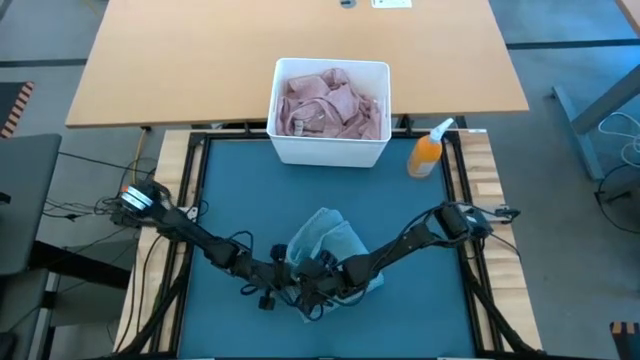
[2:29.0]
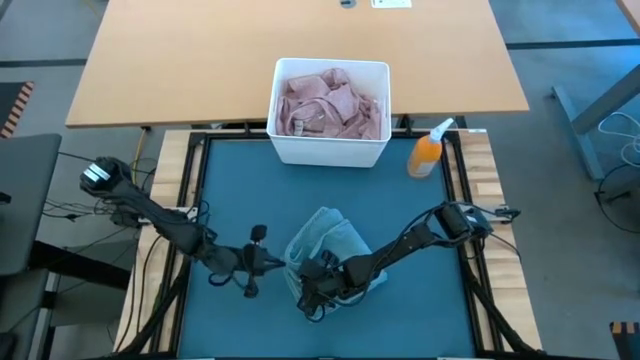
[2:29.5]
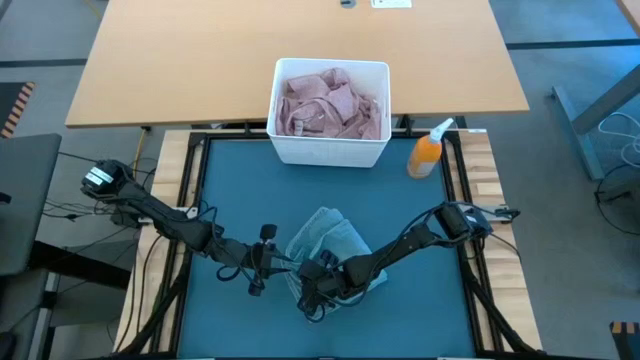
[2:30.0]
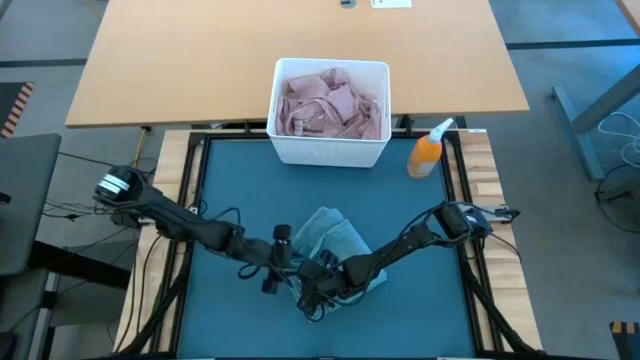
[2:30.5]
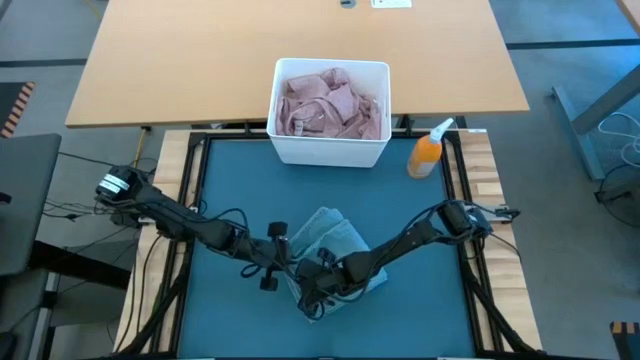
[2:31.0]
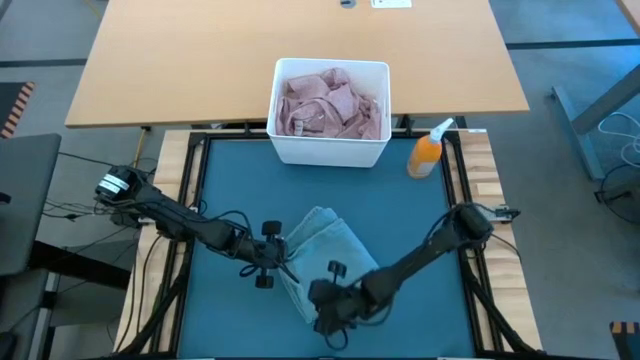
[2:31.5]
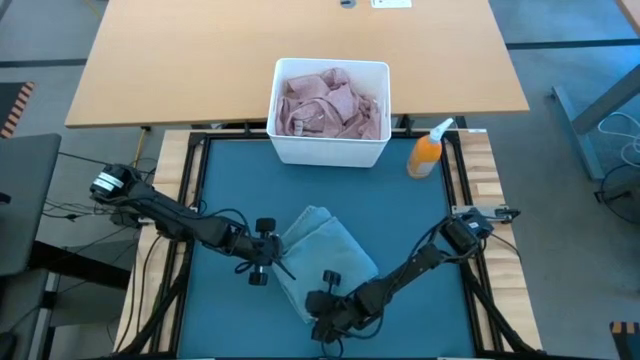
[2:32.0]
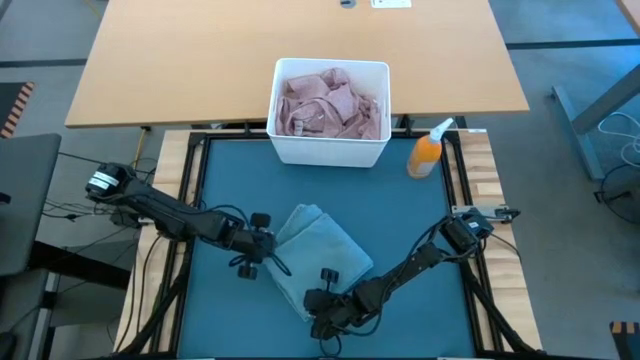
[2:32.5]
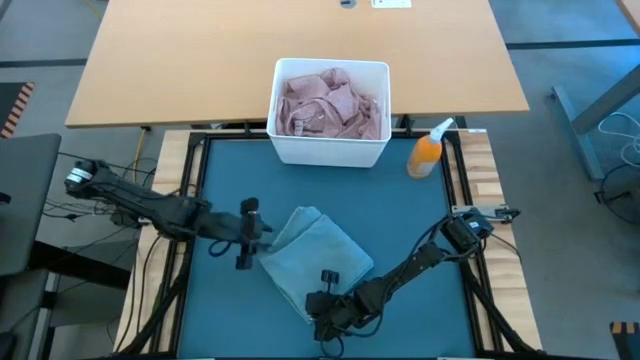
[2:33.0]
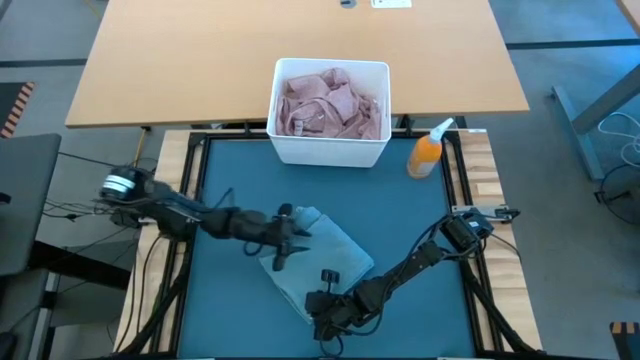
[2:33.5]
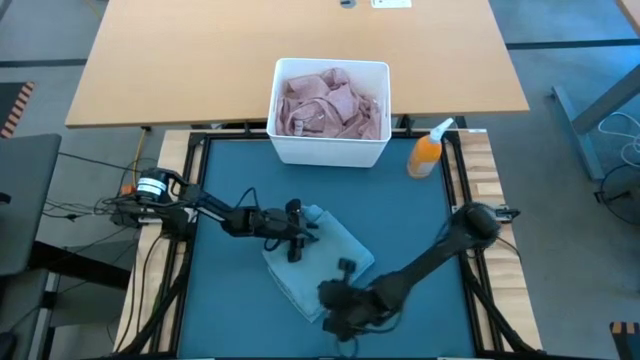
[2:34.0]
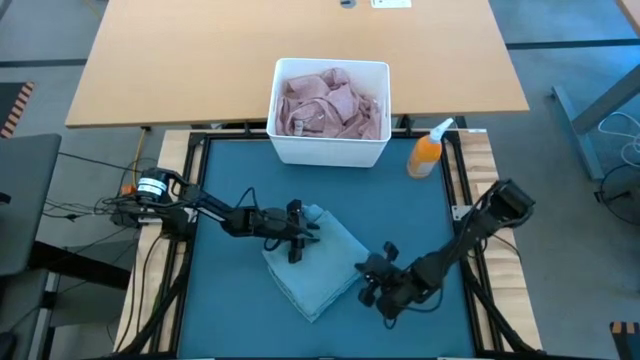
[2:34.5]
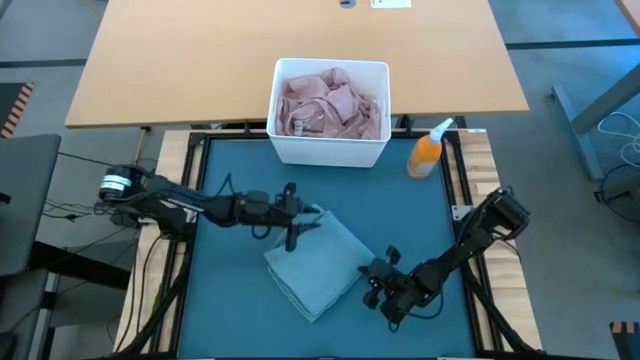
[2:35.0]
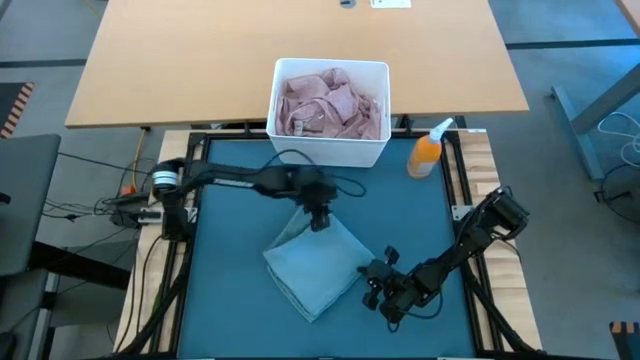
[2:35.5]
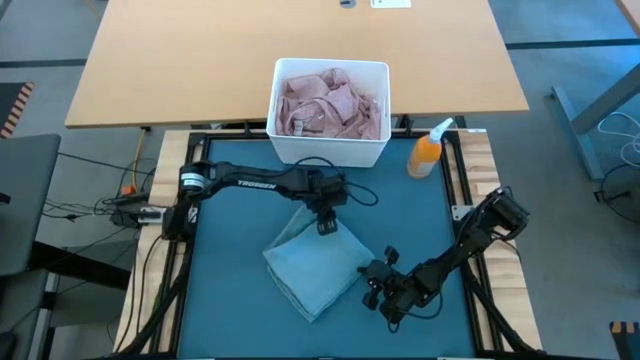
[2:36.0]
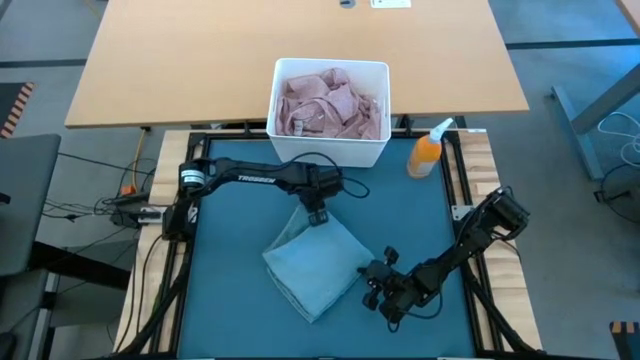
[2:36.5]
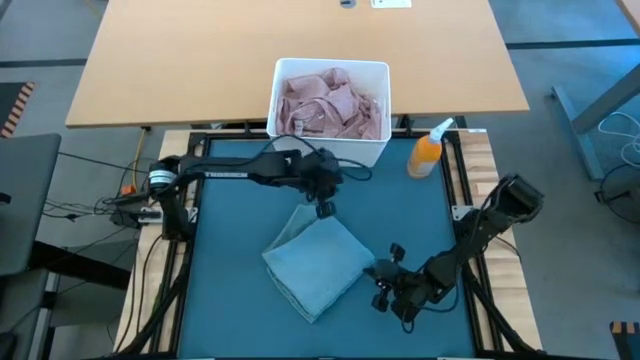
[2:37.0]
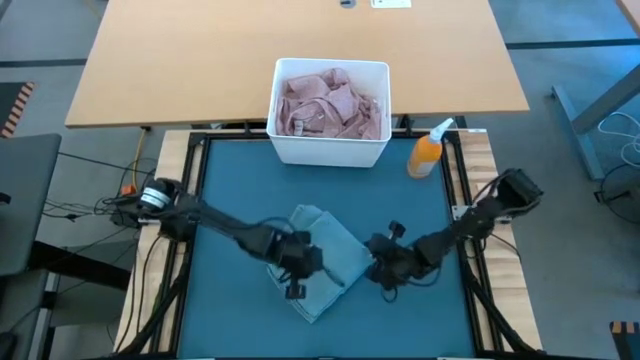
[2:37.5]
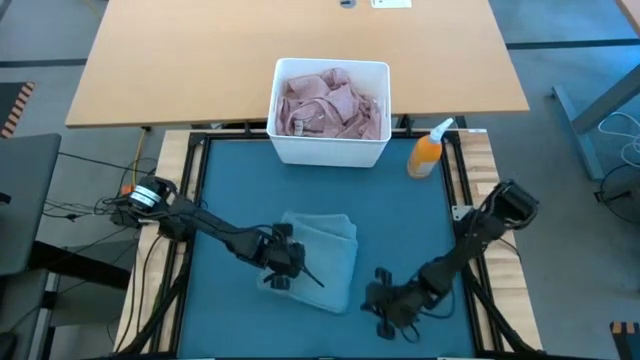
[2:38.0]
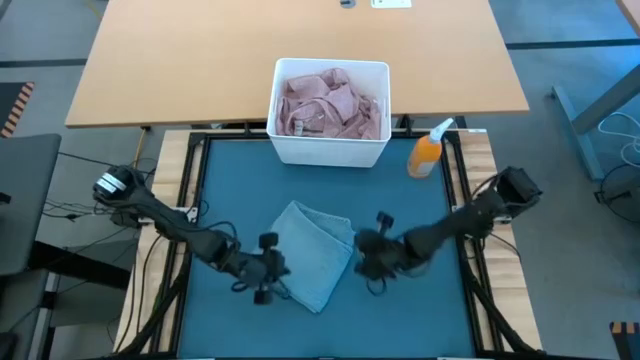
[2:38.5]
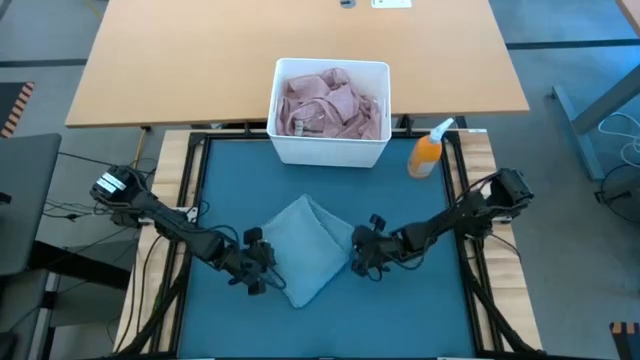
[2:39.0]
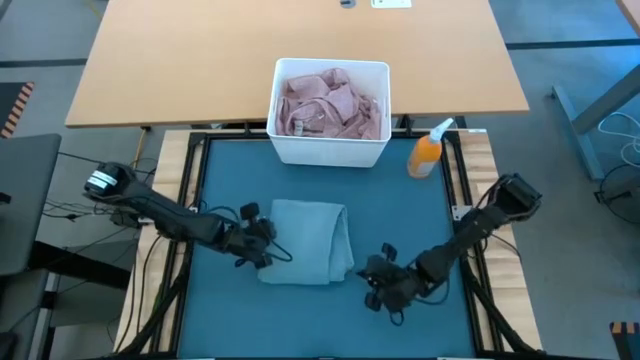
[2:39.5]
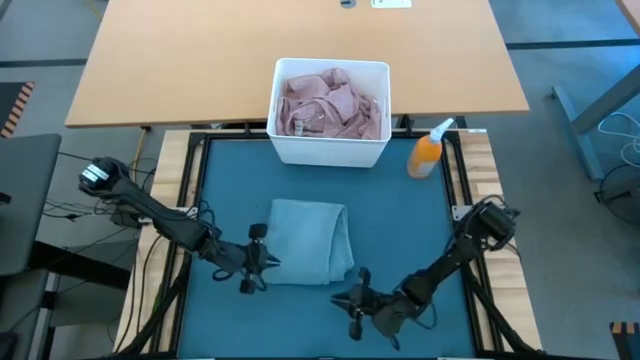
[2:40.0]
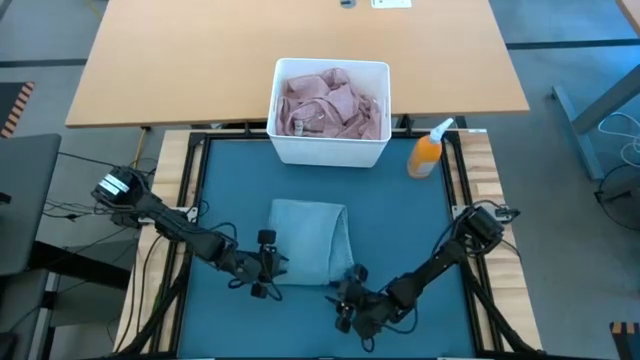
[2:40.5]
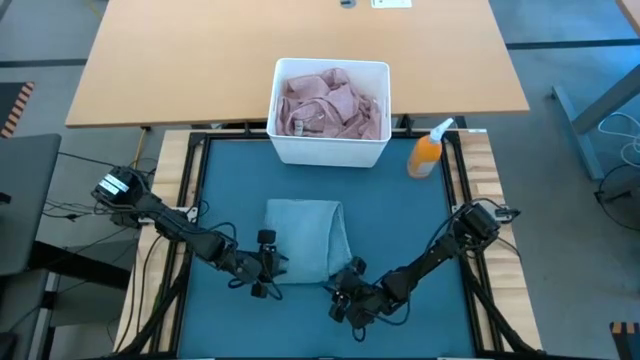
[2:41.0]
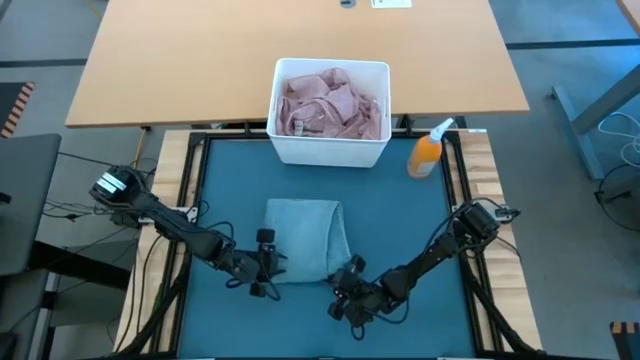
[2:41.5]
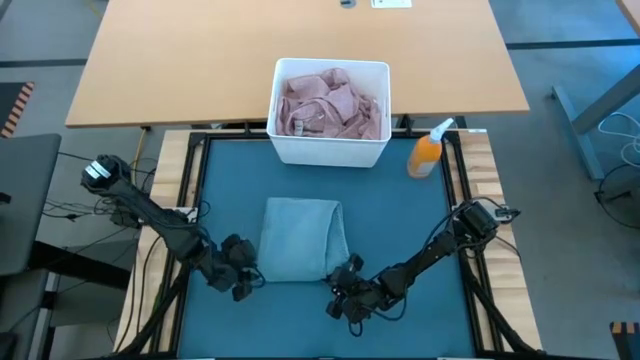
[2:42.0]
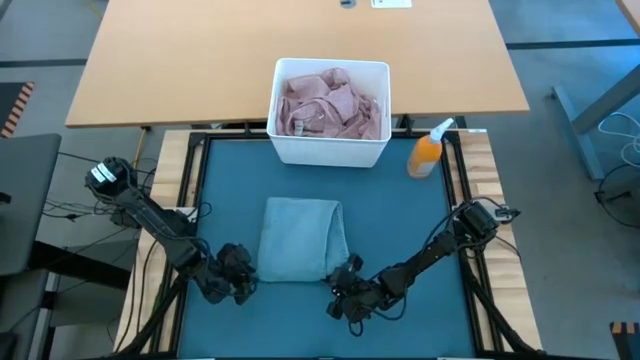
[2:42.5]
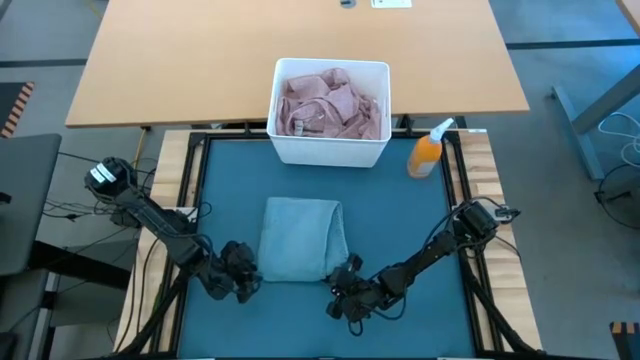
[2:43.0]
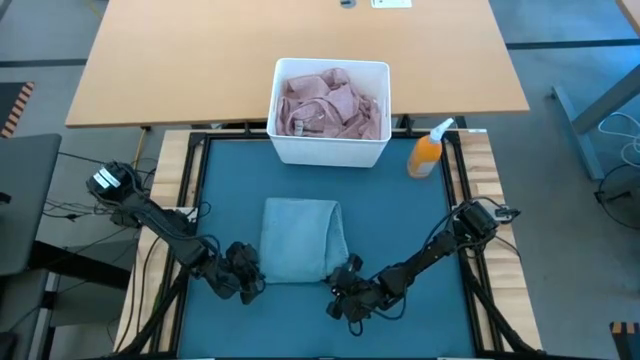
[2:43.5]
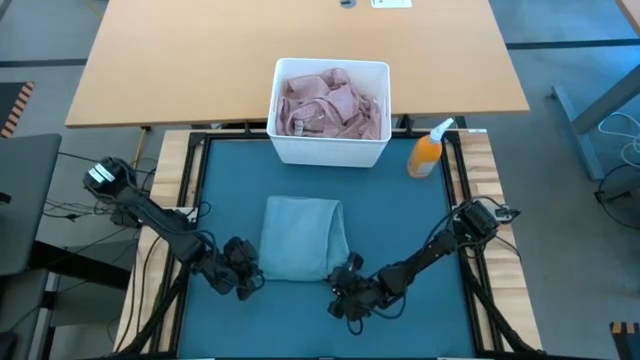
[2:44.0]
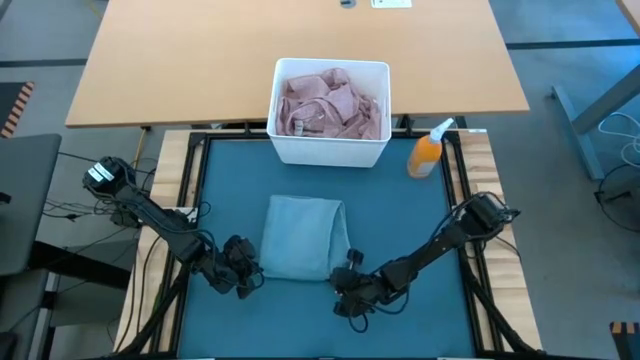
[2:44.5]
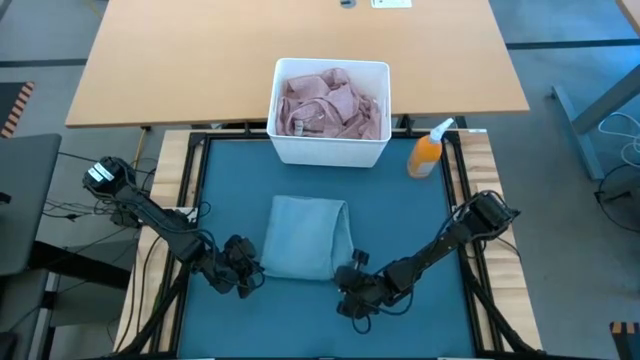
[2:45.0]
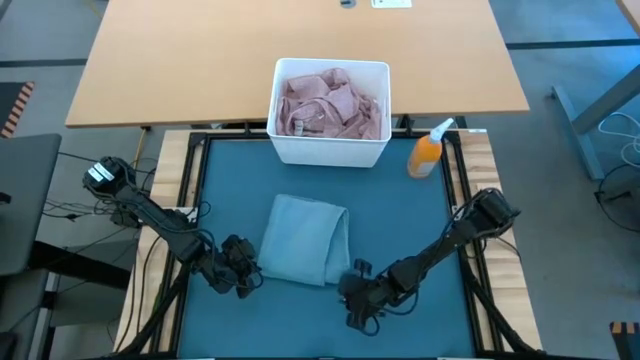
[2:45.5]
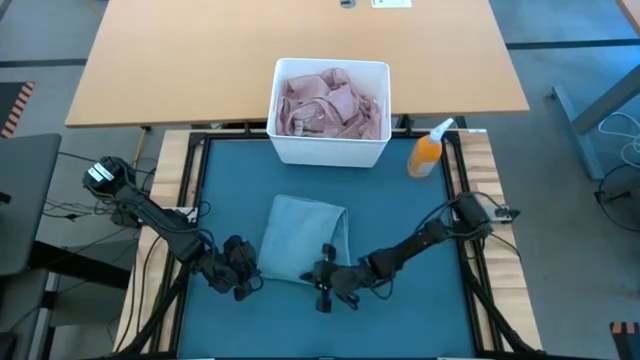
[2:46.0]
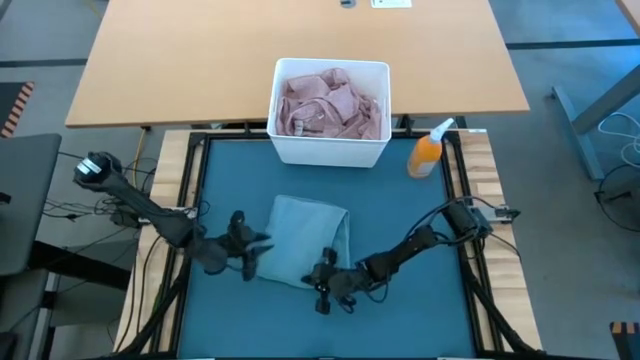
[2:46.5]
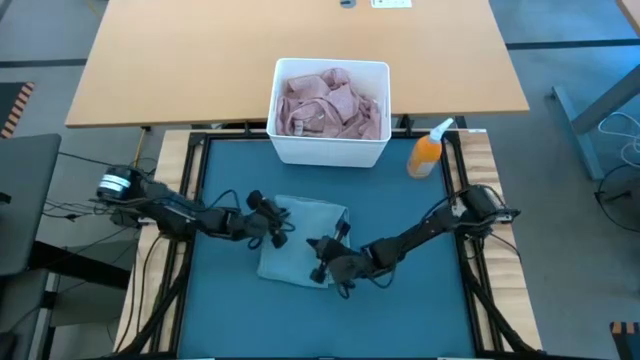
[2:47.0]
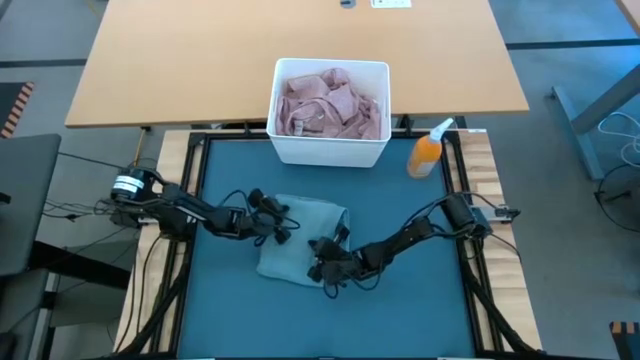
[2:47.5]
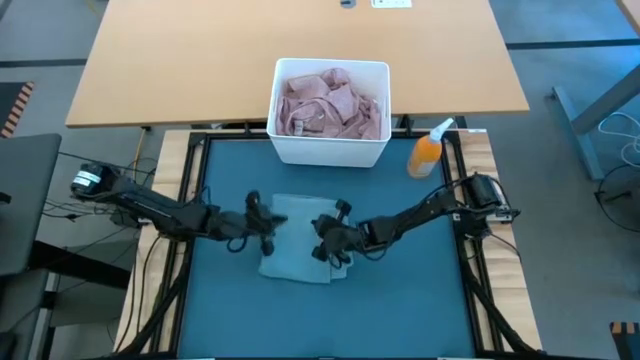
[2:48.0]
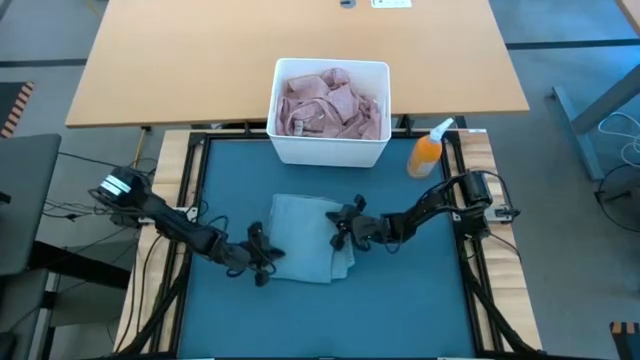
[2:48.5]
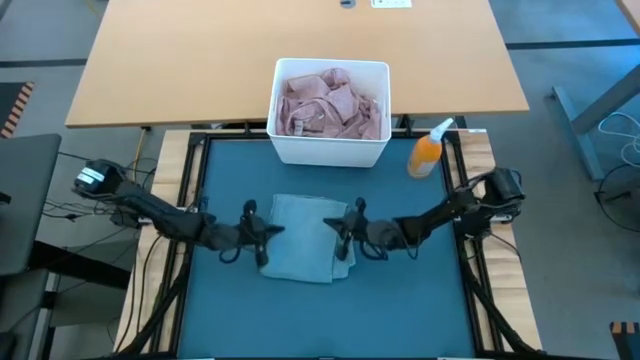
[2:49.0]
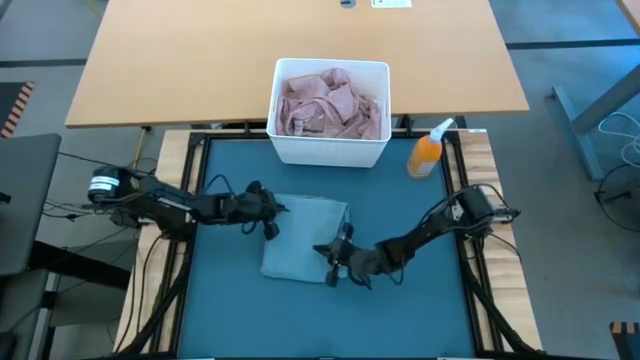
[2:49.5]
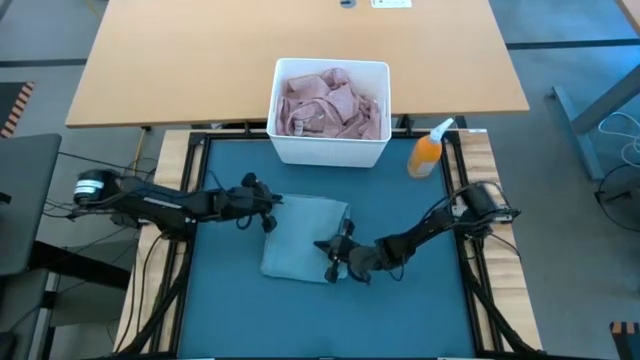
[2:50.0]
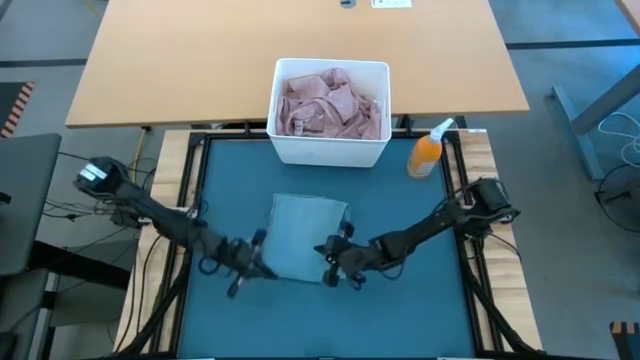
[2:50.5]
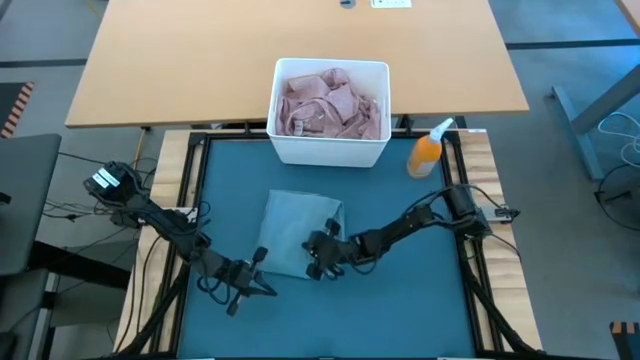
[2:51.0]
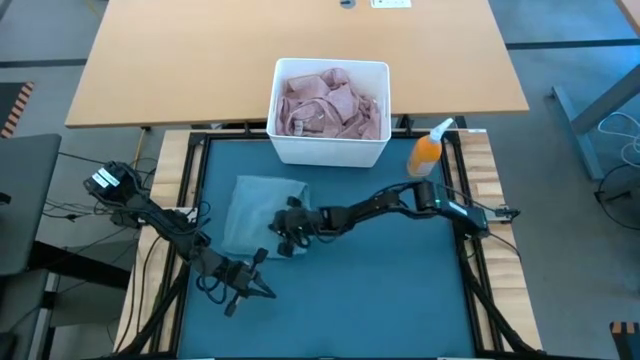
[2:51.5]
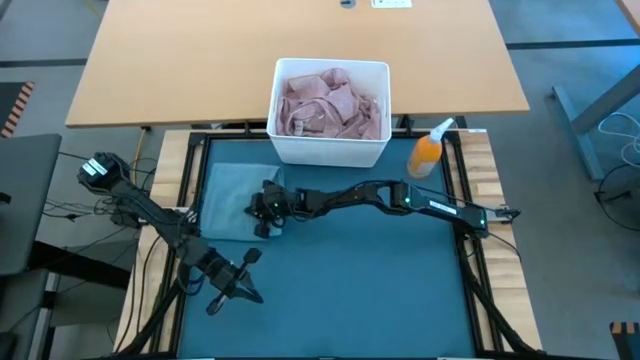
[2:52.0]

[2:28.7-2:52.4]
Task: Fold Laundry from Bin
Fold the blue pants
